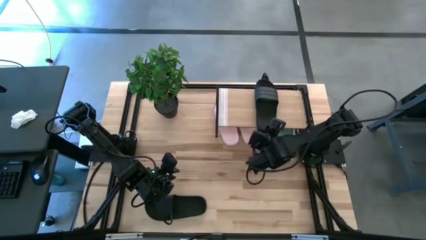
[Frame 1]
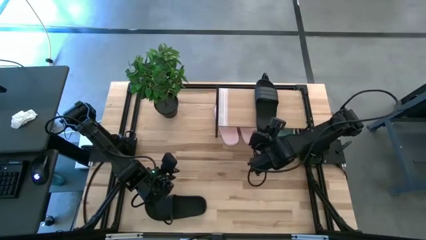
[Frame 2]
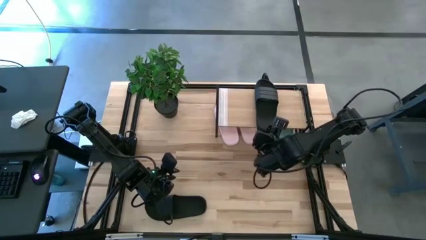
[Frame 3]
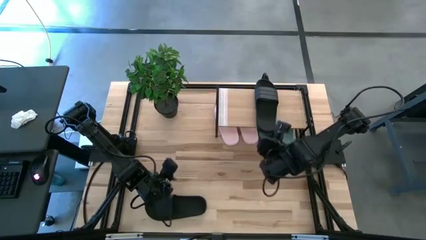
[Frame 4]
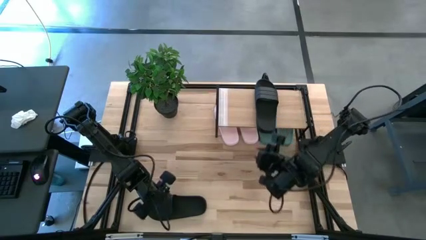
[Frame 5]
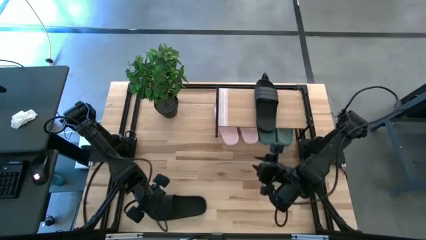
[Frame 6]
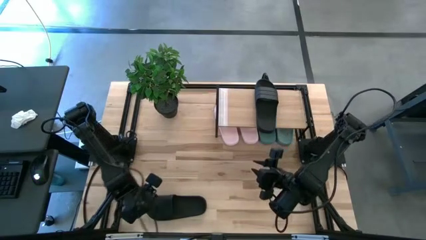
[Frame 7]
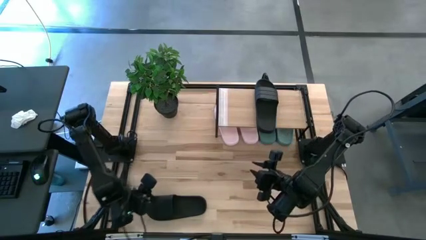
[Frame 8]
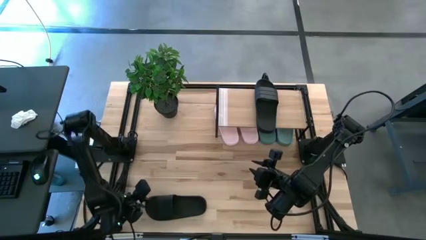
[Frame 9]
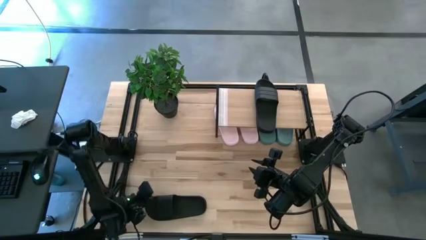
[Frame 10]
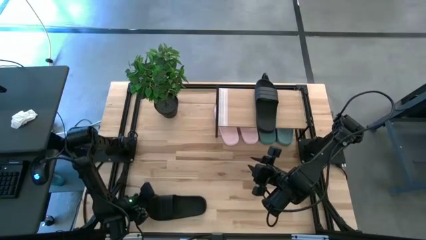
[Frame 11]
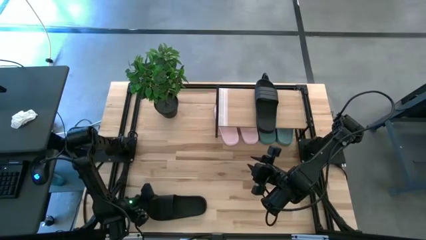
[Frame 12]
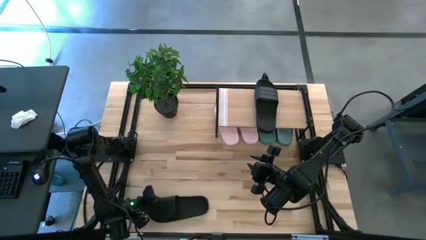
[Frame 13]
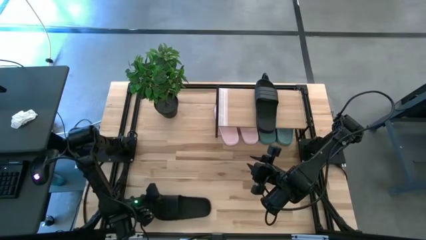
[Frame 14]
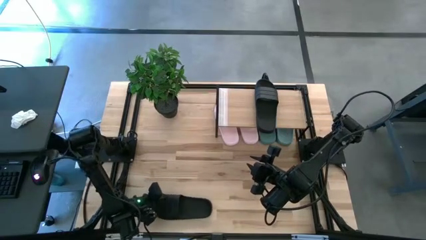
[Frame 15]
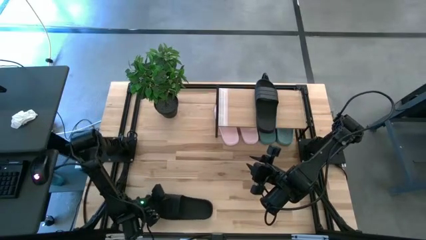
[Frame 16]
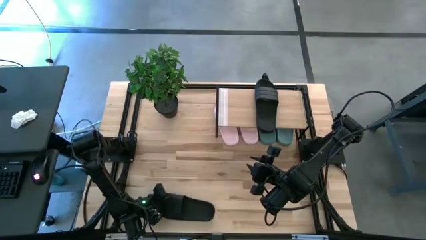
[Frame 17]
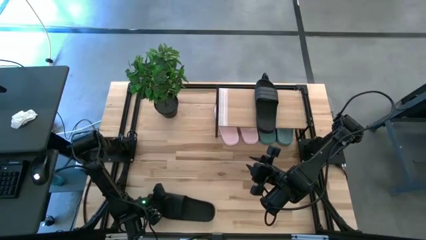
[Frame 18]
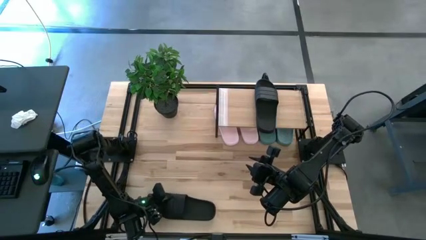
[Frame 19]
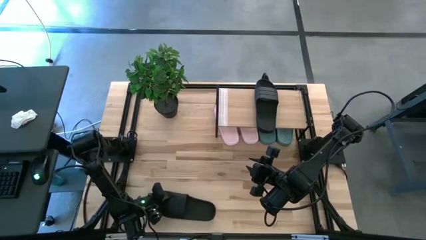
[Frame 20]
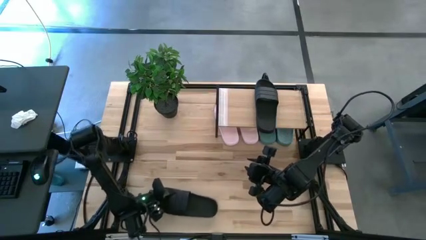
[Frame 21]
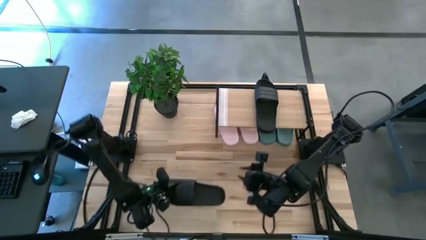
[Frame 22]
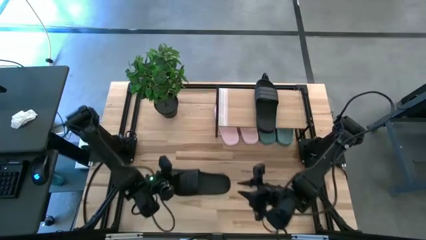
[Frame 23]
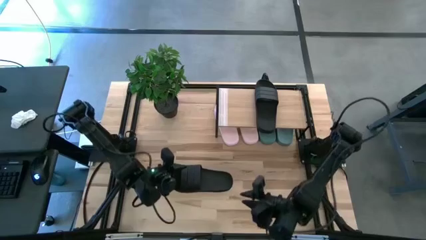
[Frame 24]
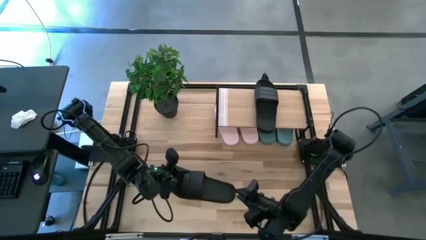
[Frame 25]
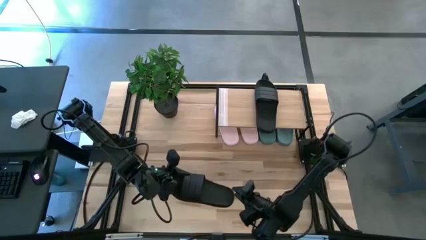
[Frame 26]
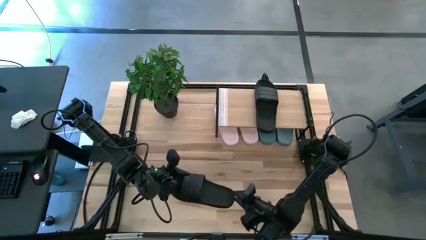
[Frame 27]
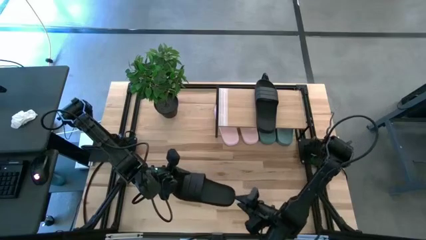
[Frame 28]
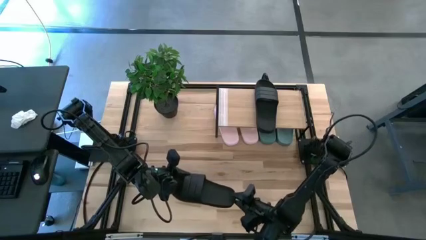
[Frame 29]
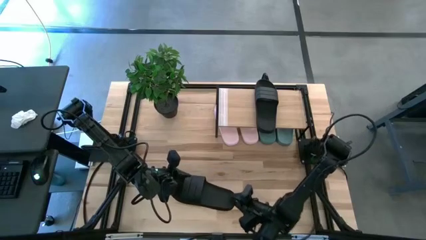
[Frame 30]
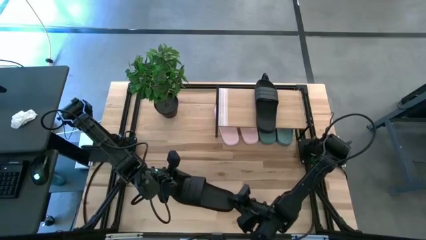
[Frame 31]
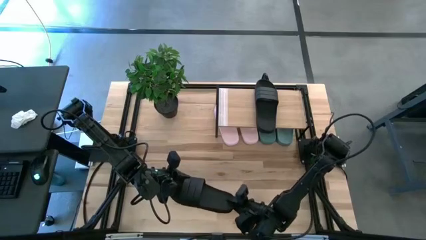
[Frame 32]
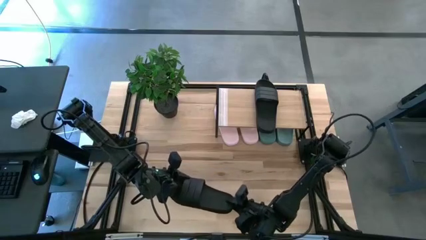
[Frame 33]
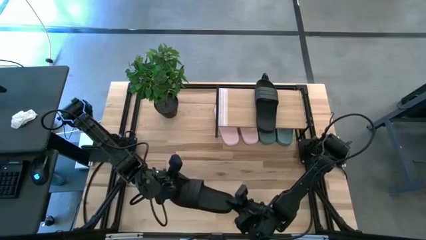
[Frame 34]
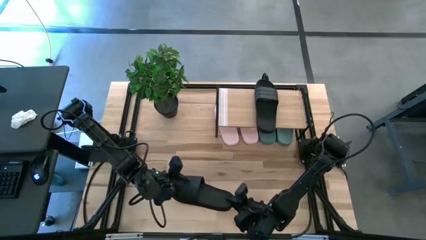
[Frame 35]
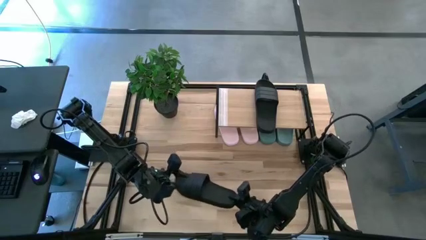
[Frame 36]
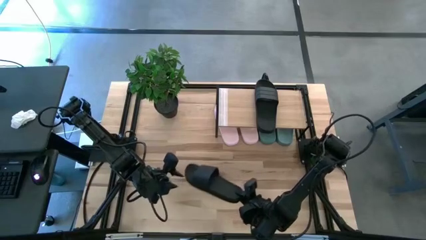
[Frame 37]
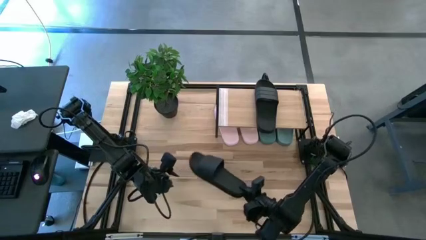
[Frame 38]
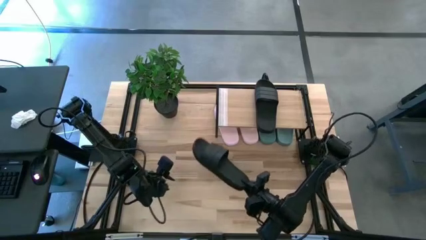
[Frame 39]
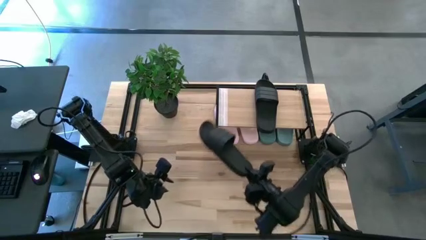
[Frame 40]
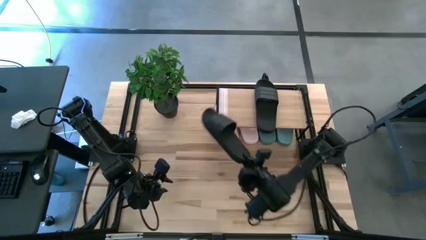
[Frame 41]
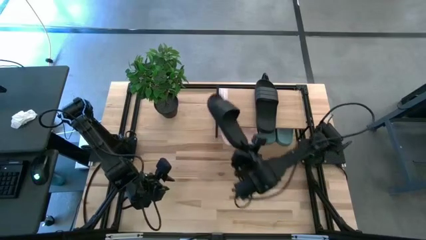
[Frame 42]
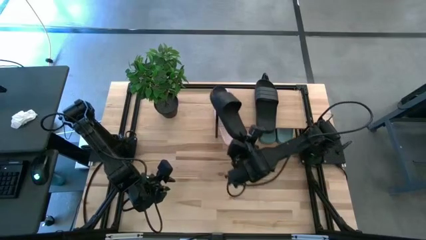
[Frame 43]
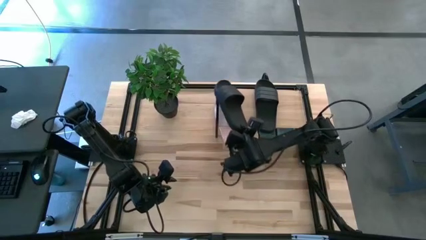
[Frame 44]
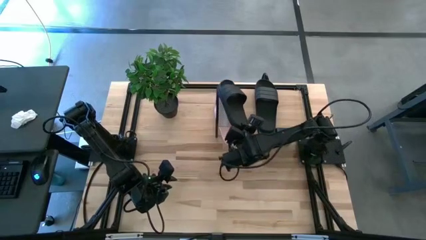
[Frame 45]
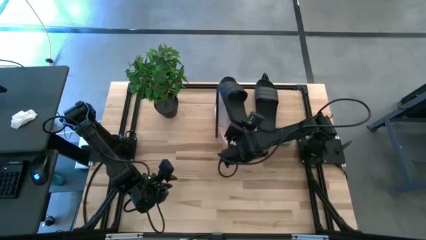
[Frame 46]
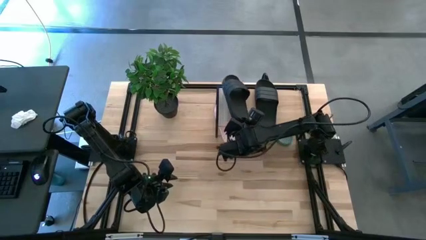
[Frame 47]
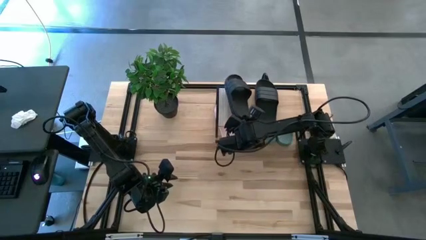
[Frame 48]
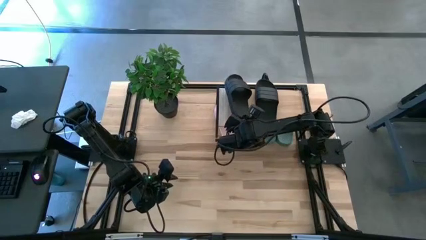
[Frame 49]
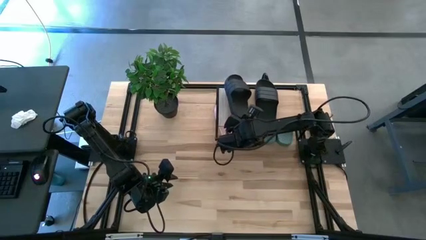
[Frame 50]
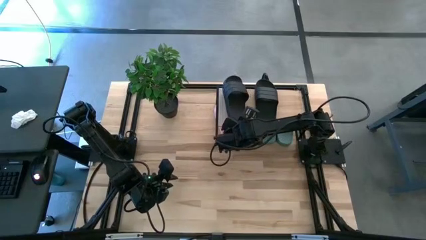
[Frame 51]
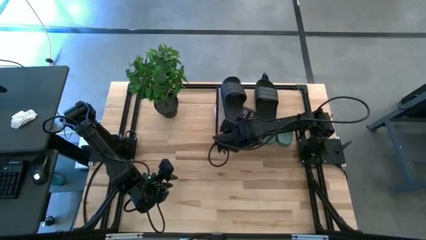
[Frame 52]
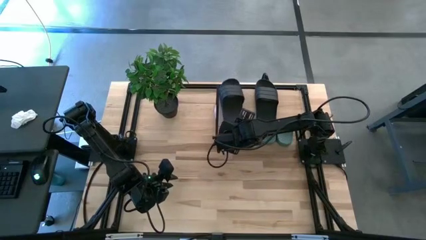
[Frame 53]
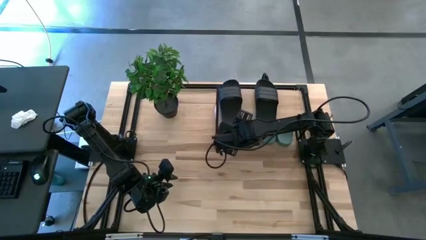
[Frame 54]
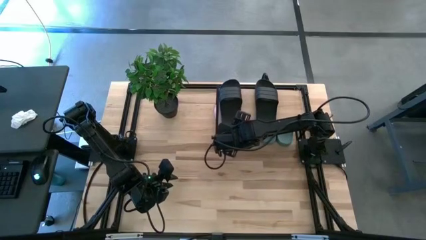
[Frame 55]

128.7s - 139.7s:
Task: Pick and place slides into the shelf
Put the black slide on the shelf

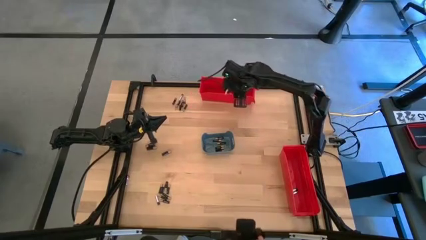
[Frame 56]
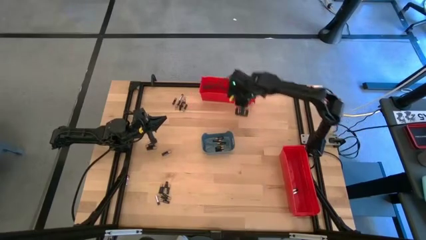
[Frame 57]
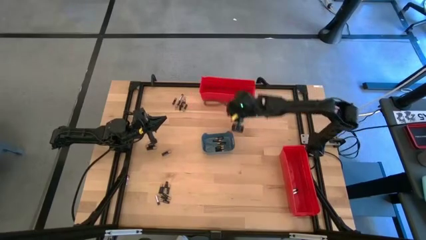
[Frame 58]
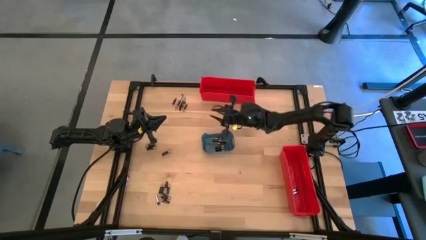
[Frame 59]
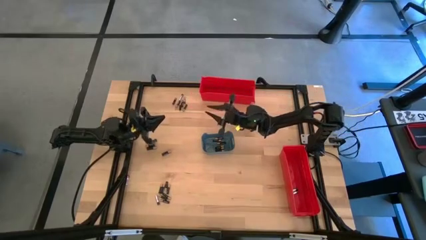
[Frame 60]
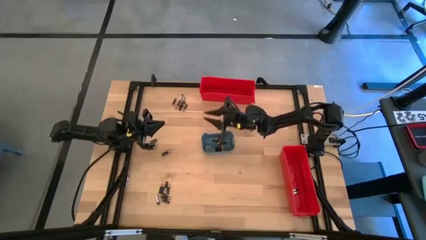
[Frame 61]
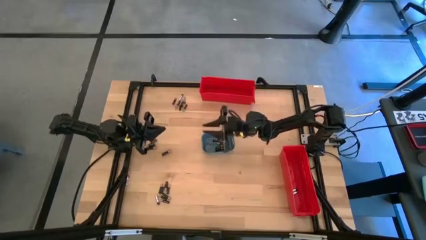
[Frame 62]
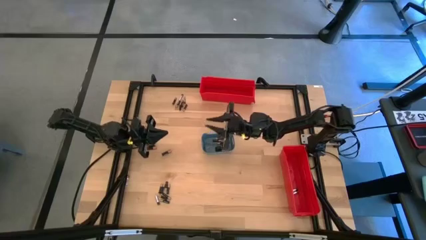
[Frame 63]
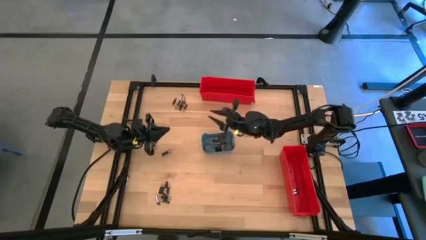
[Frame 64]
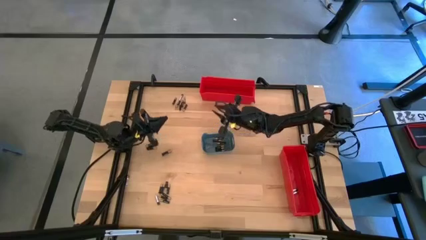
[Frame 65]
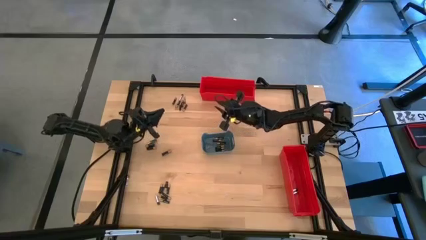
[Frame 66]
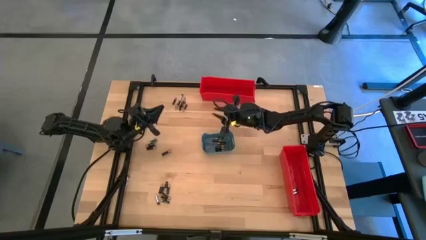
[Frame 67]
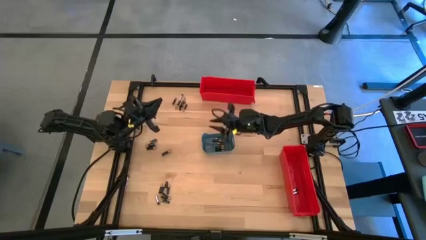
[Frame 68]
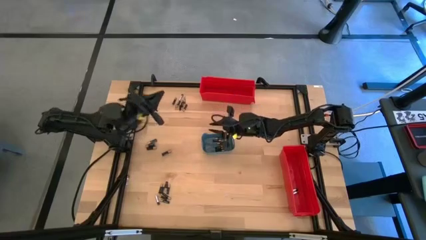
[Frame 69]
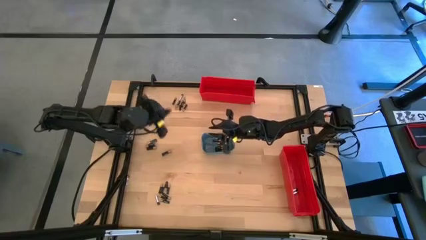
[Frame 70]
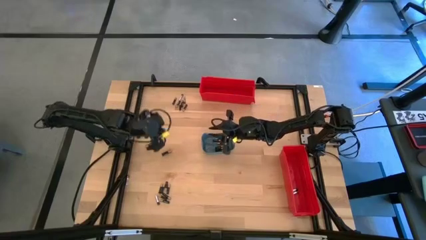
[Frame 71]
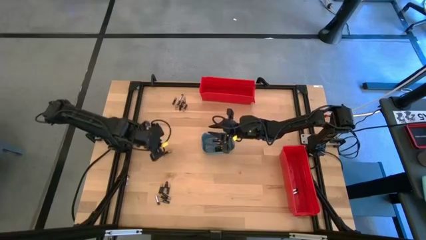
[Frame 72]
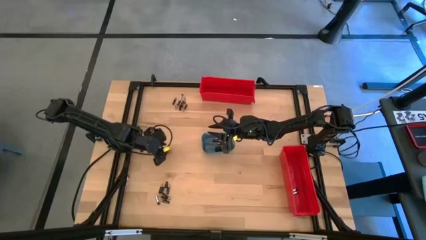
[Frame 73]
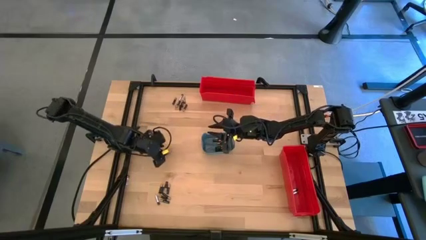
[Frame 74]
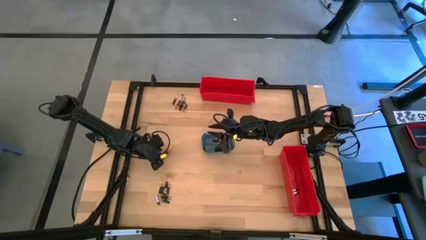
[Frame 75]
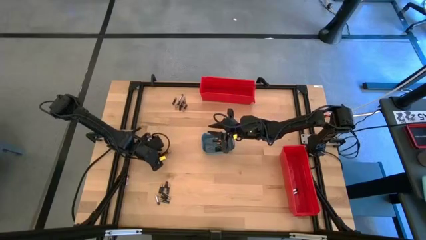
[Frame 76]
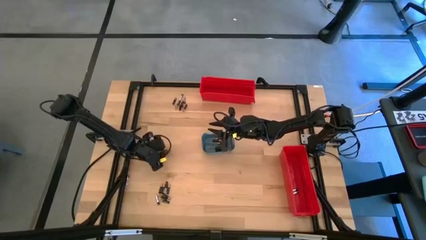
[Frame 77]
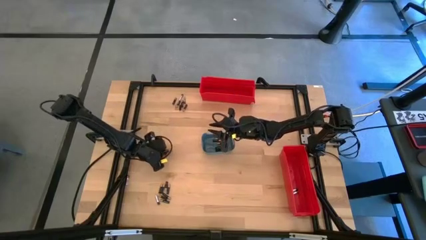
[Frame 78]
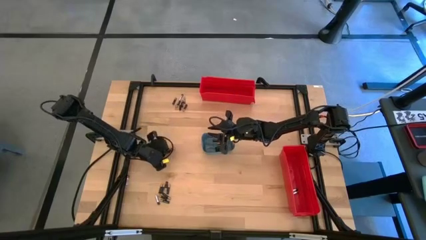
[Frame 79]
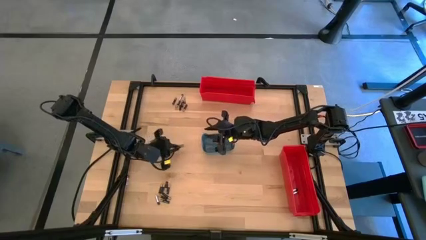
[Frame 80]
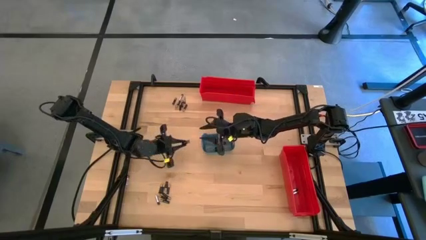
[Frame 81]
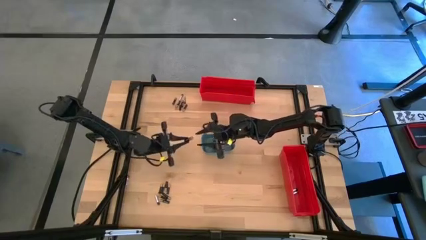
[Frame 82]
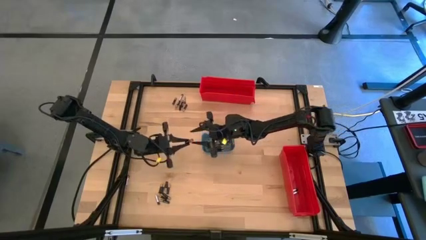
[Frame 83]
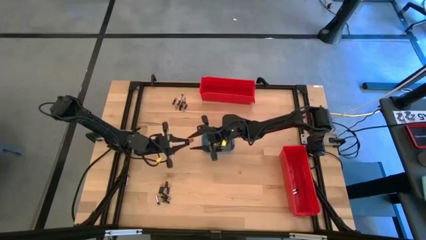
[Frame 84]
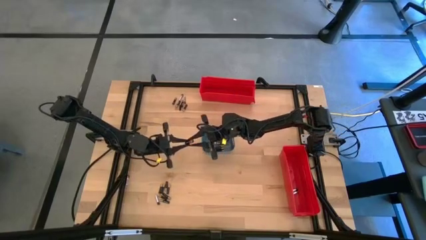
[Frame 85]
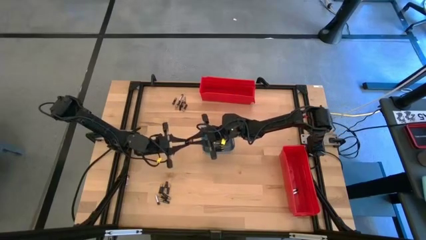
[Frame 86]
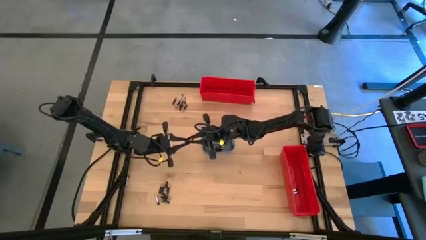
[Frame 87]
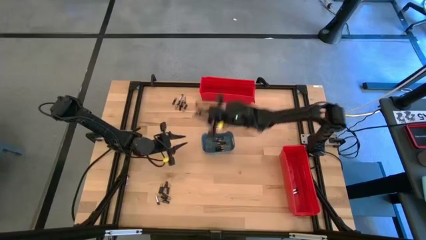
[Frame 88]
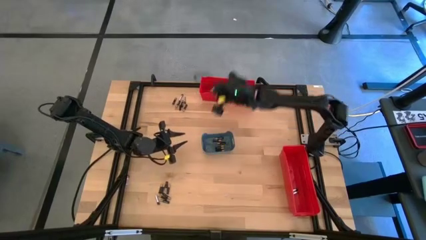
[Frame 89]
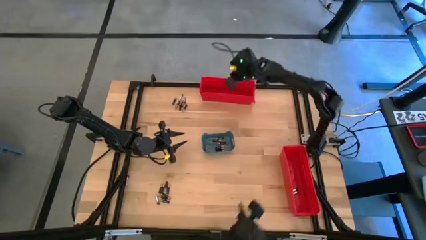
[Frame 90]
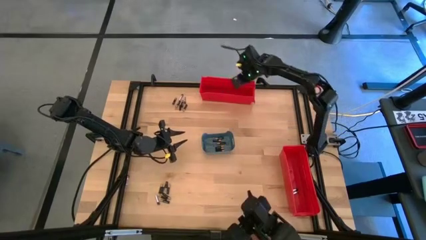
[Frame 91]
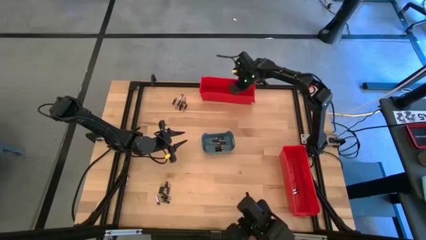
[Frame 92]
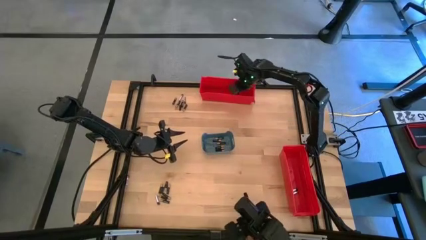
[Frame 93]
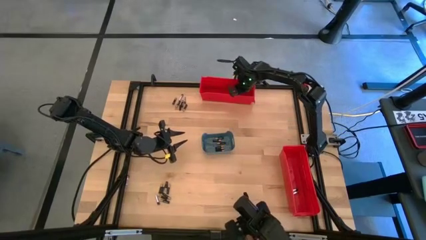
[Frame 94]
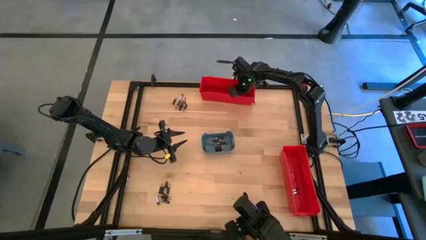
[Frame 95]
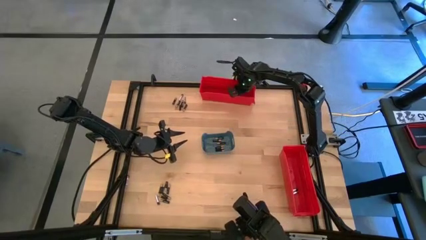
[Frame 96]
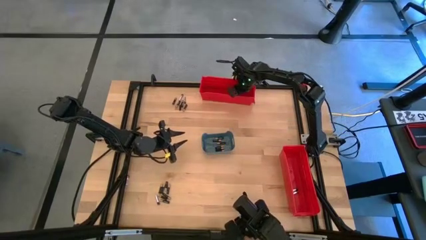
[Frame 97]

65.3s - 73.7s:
Task: Sort batteries
Put the black battery into the top red bin
